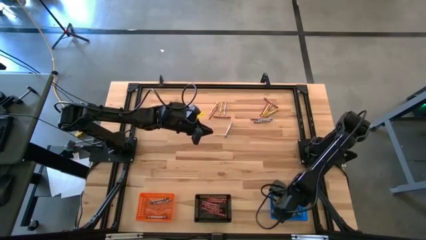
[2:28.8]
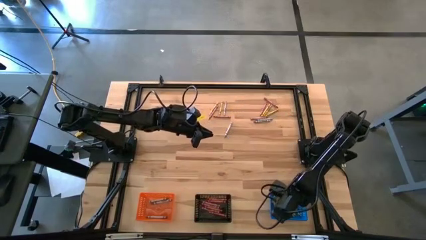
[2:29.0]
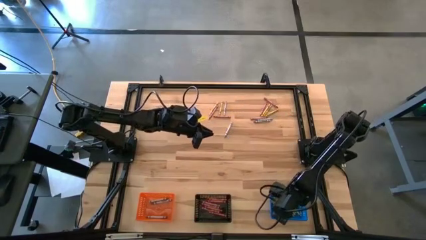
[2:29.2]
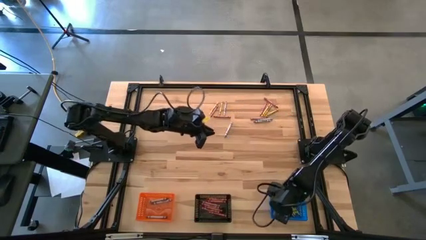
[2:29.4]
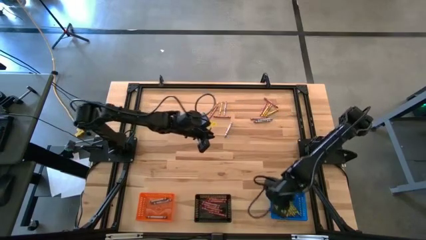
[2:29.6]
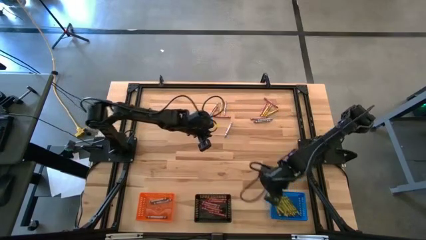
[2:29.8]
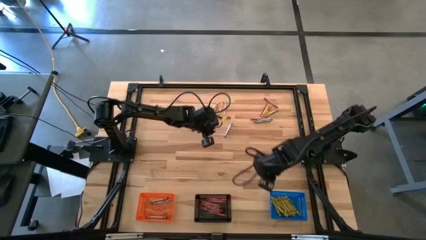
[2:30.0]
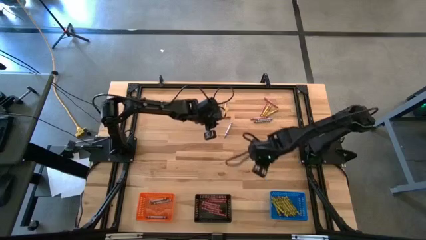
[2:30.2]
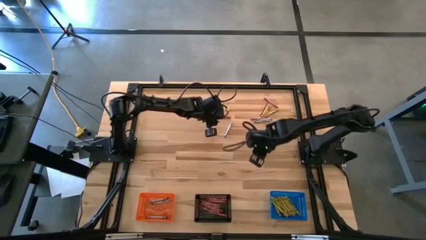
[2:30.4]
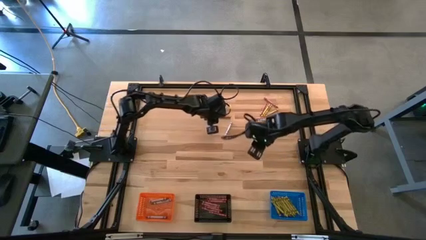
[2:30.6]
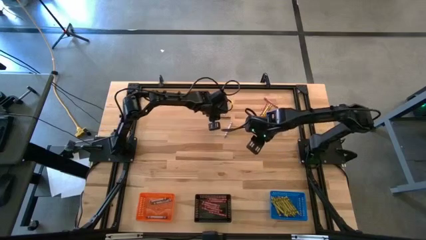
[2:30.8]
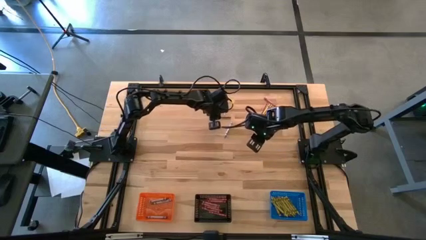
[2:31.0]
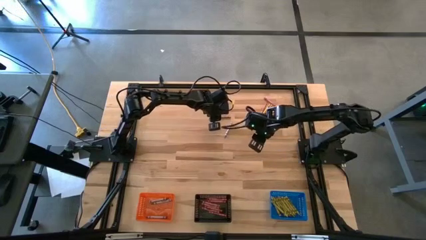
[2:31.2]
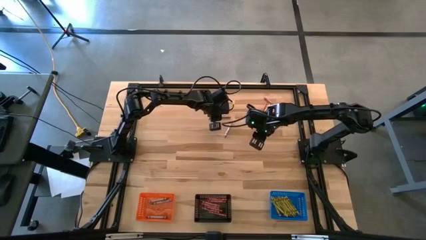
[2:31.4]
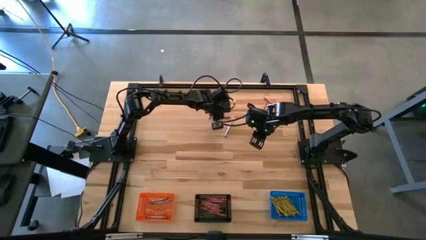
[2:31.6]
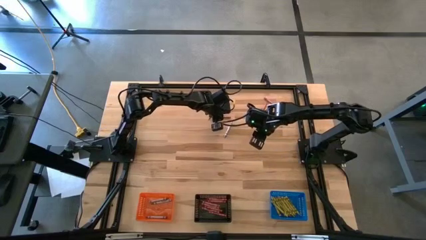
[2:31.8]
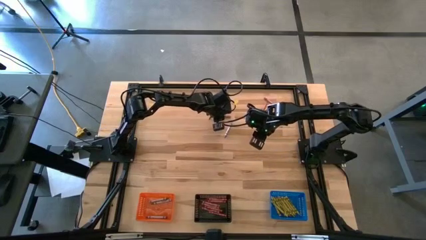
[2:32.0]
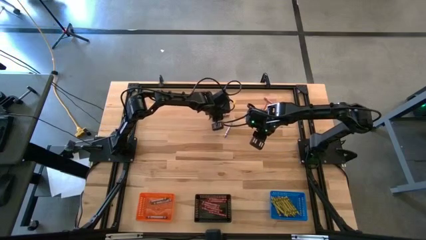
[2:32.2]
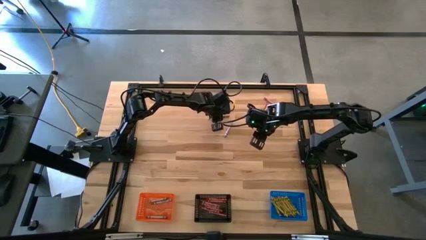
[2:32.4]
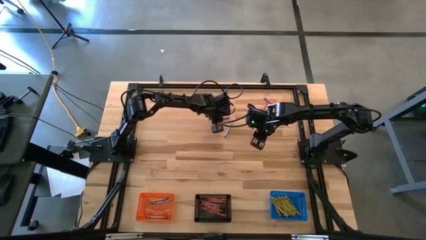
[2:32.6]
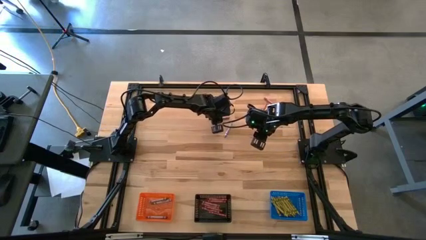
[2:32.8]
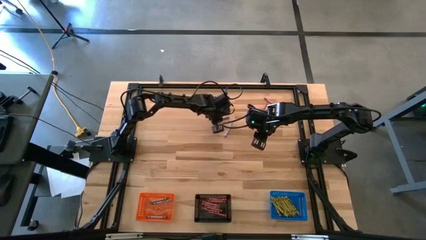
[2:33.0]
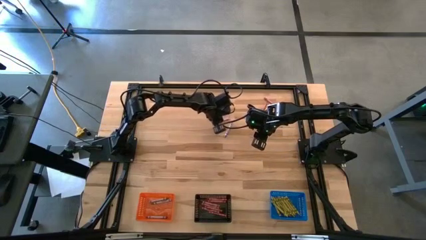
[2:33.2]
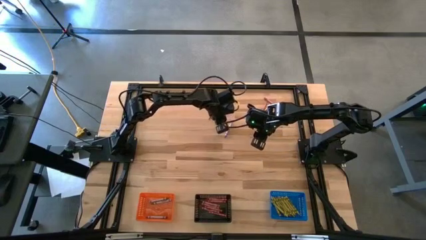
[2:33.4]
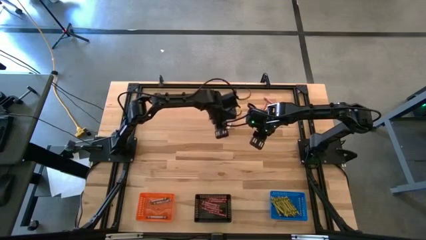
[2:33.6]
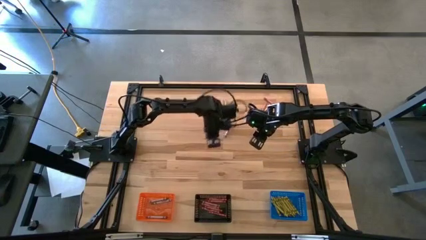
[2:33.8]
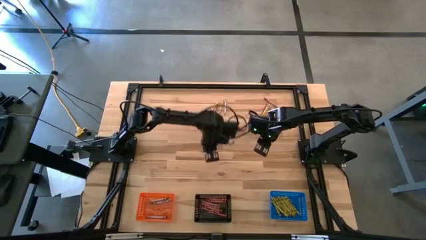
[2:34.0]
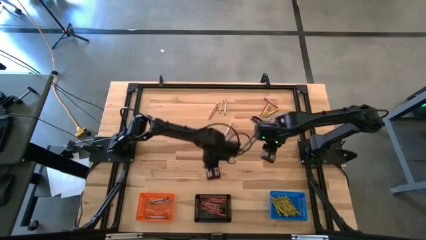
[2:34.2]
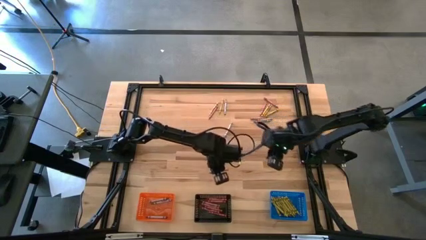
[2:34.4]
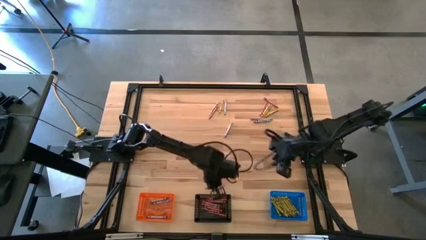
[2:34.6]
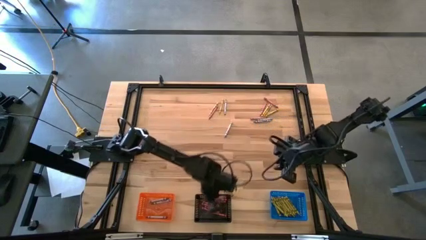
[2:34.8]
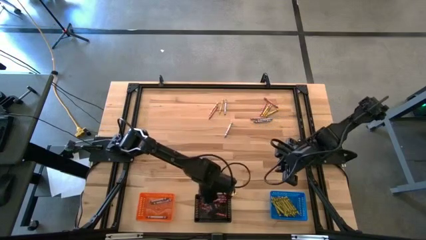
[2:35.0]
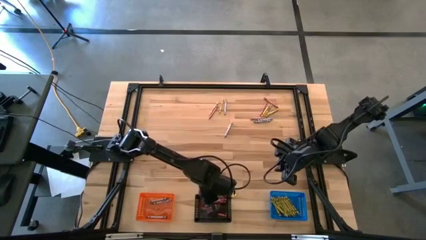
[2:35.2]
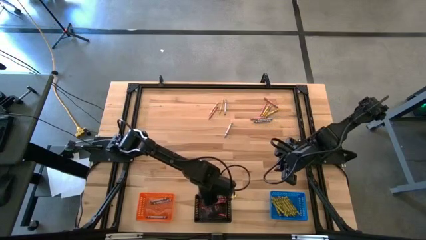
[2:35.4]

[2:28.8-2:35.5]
Task: Sort crayons
Put the red crayon into the black bin

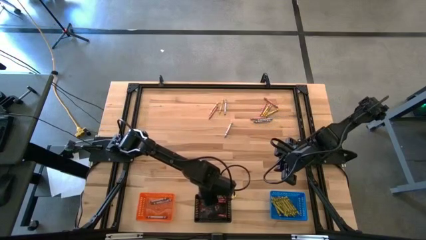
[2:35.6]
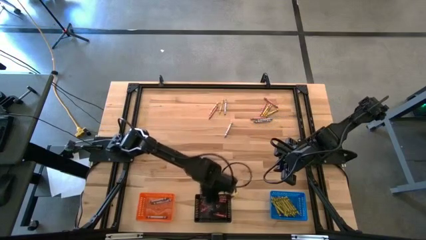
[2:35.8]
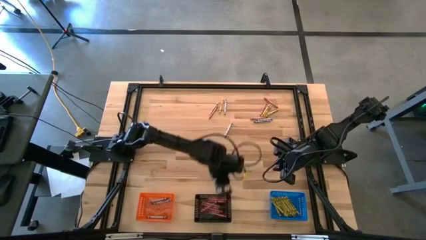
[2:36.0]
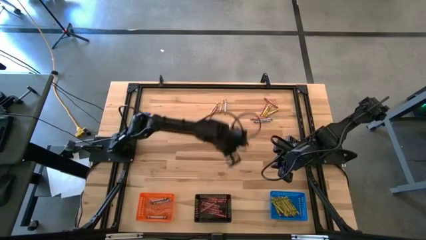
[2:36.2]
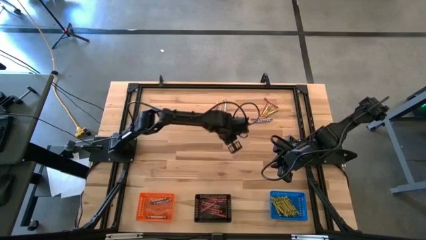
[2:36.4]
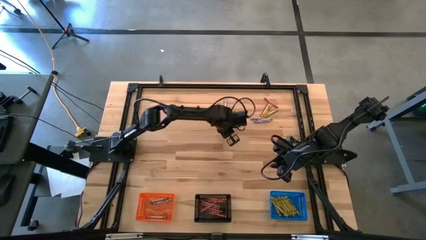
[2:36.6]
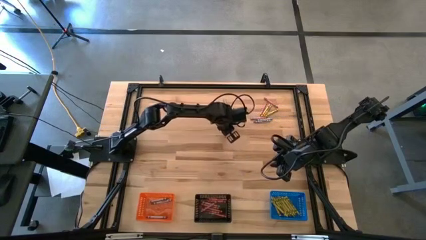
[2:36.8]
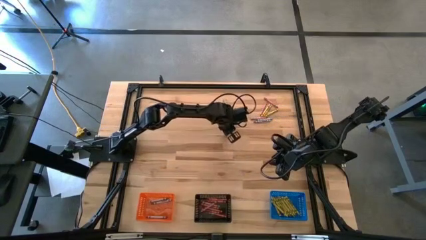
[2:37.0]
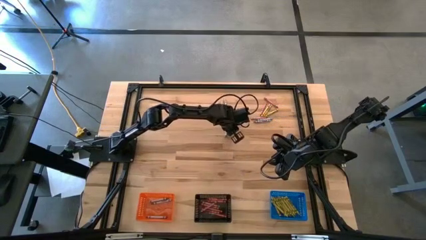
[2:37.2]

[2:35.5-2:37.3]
Put the gray crayon into the orange bin

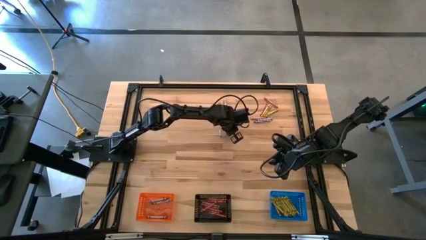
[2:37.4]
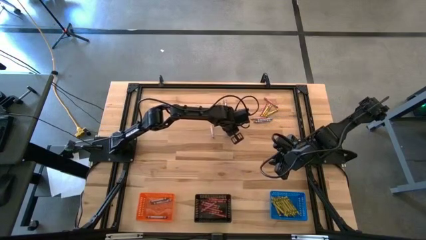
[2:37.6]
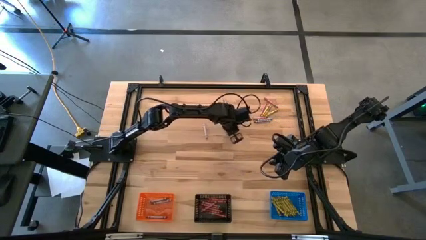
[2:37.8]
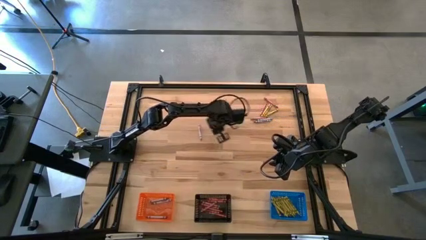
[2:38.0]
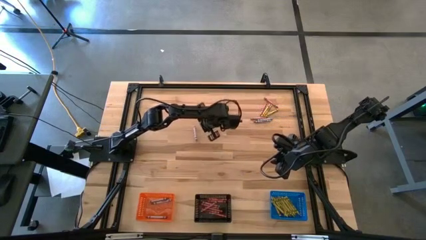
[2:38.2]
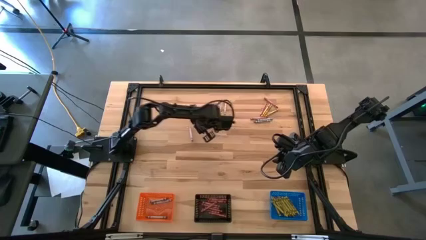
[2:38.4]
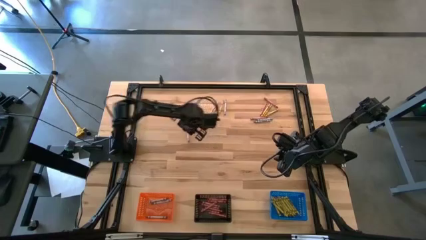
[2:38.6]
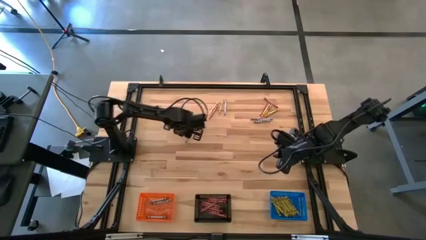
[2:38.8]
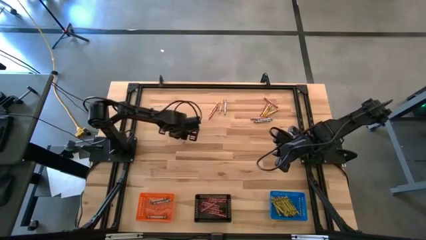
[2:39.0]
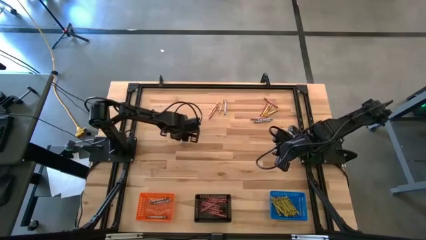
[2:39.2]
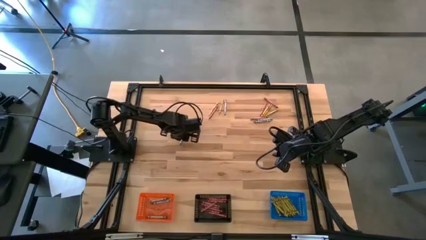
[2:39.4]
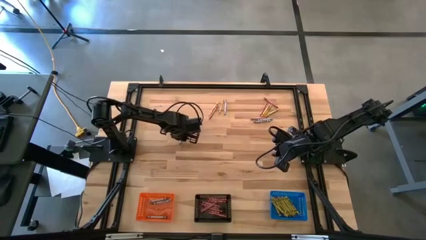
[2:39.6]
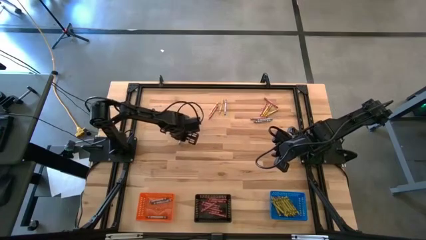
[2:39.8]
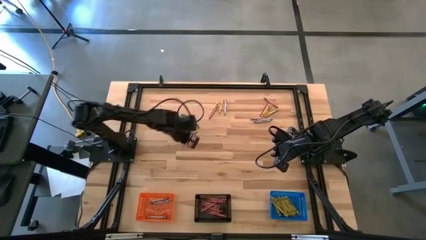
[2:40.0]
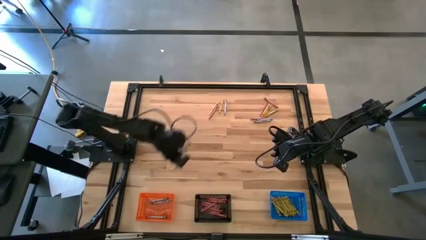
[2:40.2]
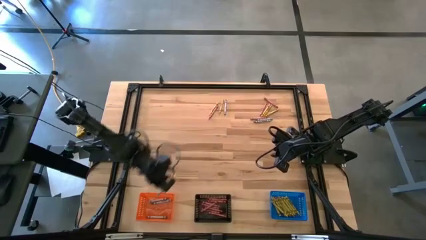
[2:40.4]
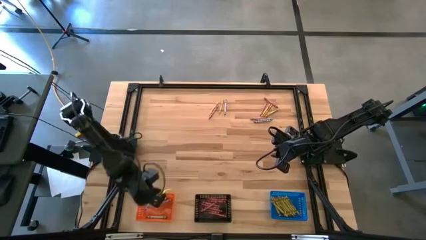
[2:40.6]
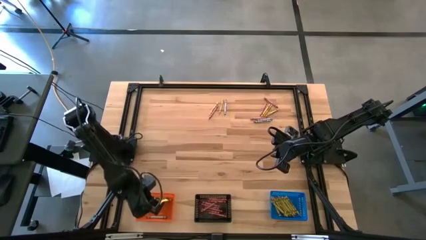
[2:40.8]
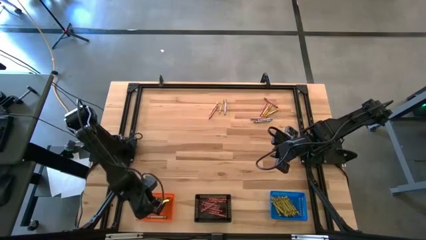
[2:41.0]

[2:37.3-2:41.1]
Put the gray crayon into the orange bin

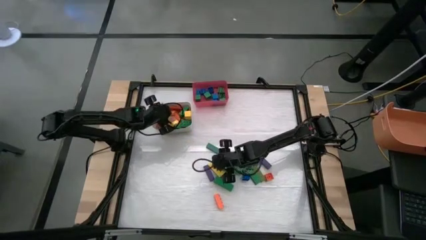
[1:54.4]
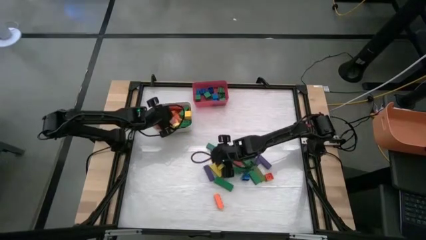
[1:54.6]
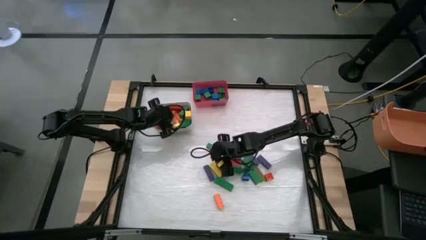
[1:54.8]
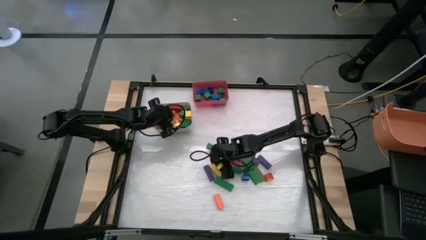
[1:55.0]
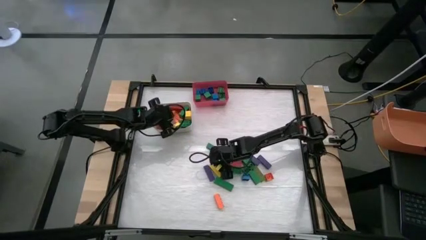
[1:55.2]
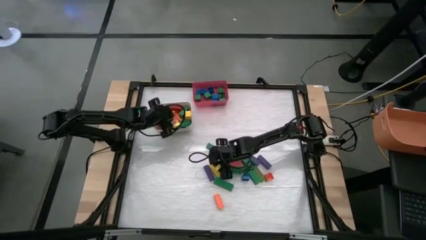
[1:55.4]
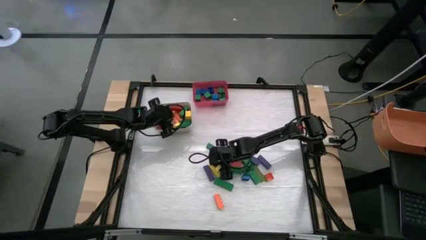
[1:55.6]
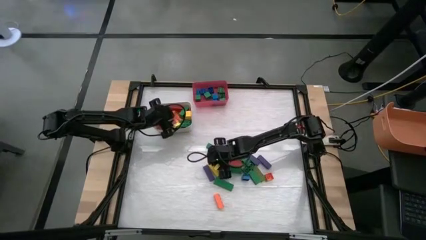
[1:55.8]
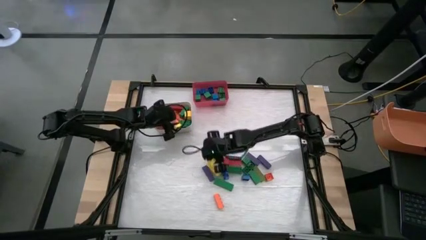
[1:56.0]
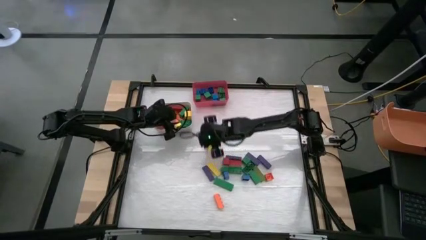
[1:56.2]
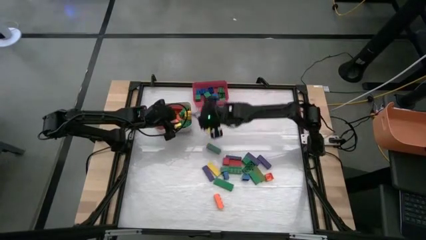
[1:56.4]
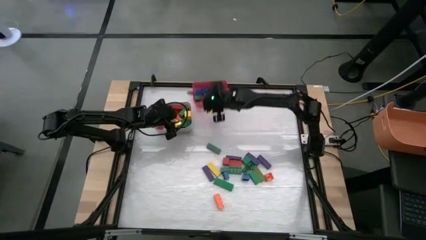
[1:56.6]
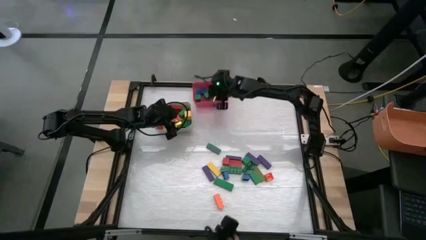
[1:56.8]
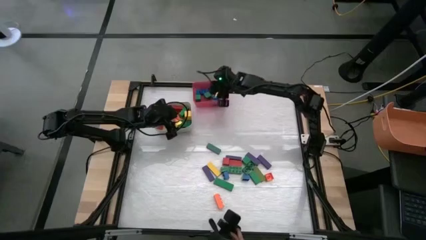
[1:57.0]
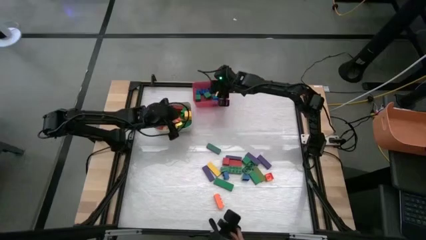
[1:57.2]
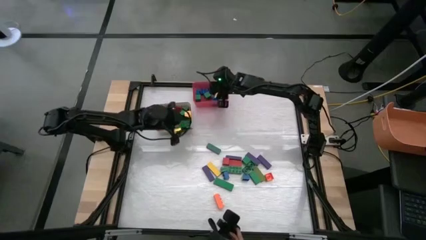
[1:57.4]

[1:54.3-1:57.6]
Task: Sort blocks by size
Put the small red wooden block into the red bin
